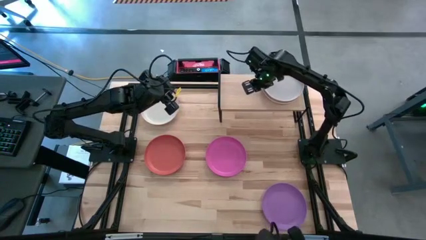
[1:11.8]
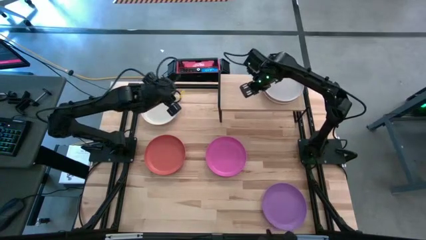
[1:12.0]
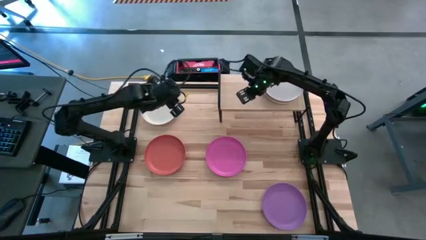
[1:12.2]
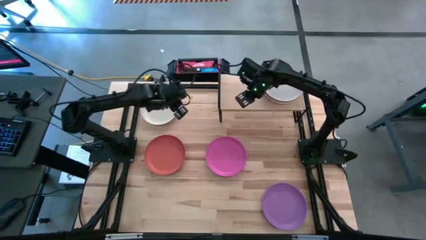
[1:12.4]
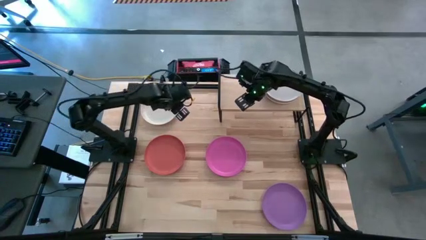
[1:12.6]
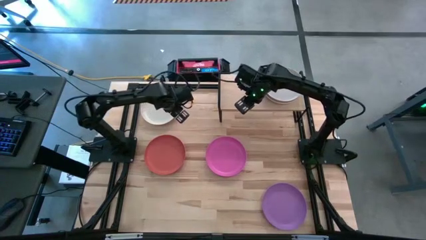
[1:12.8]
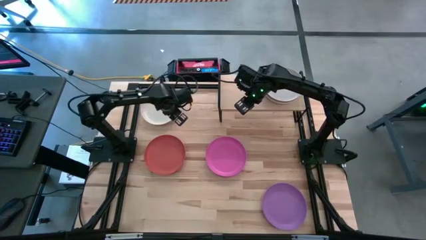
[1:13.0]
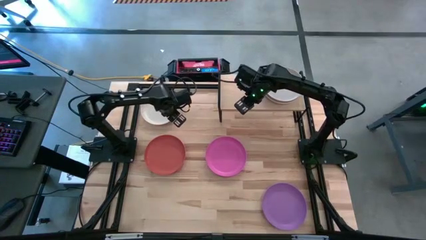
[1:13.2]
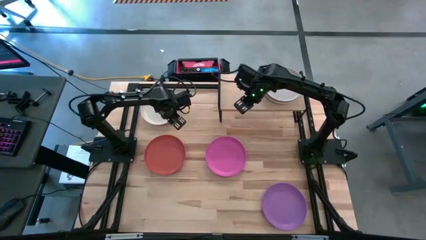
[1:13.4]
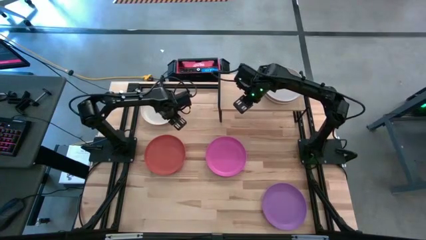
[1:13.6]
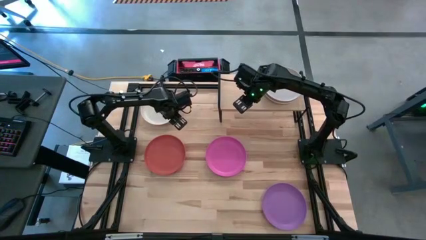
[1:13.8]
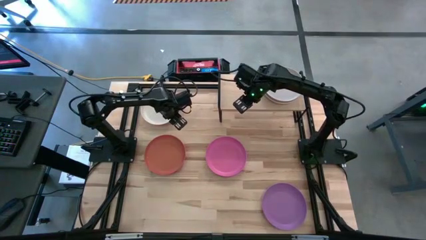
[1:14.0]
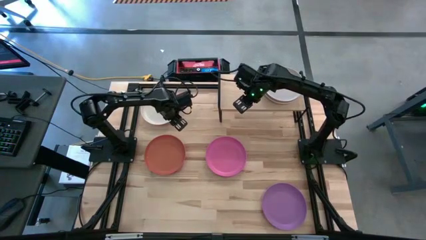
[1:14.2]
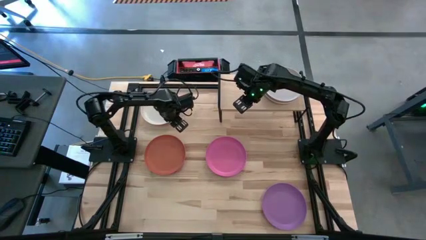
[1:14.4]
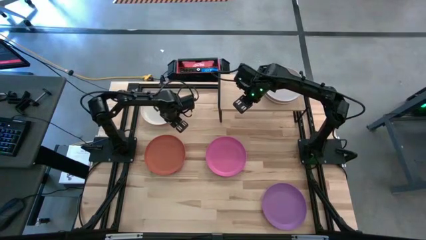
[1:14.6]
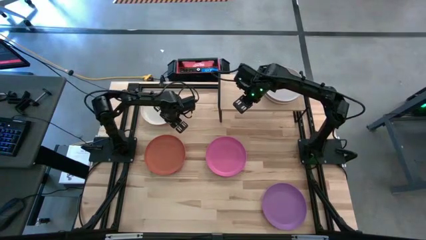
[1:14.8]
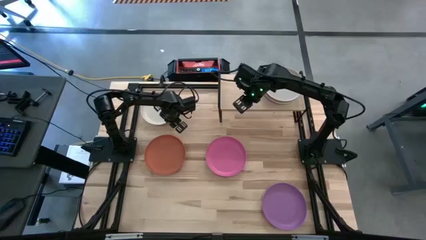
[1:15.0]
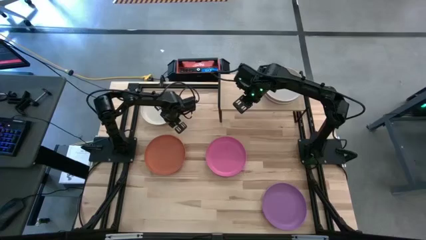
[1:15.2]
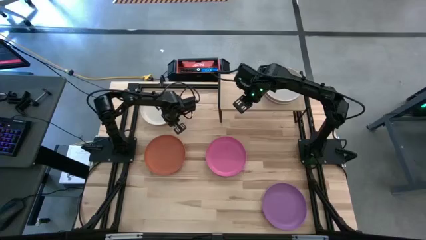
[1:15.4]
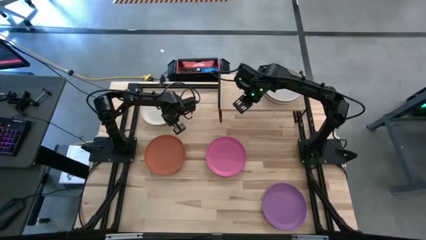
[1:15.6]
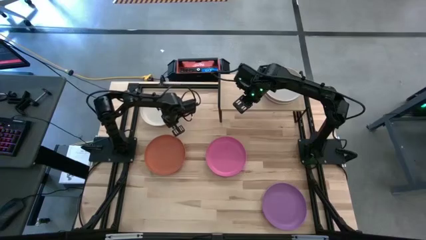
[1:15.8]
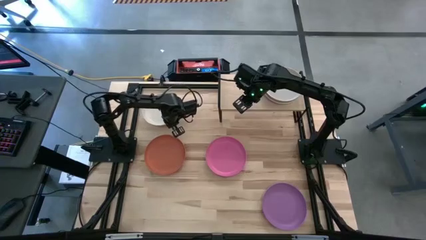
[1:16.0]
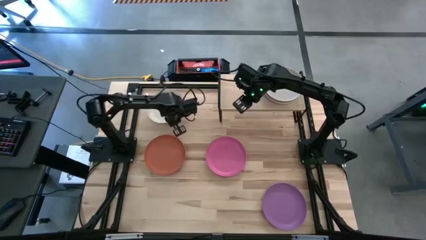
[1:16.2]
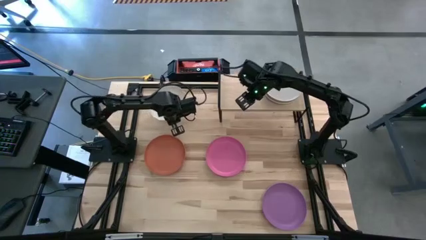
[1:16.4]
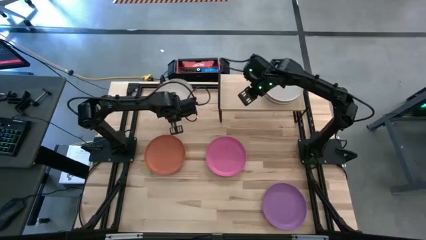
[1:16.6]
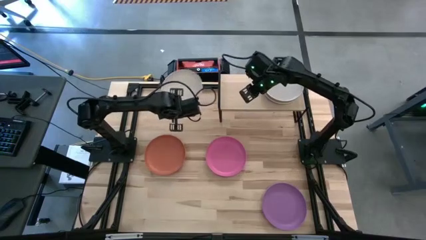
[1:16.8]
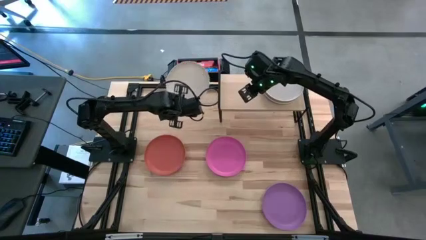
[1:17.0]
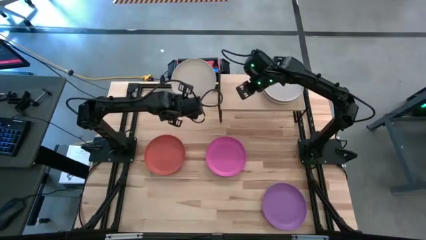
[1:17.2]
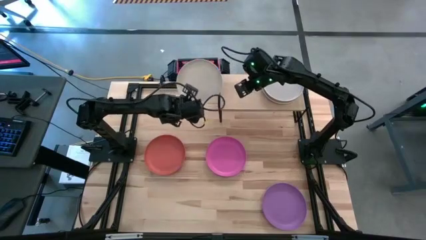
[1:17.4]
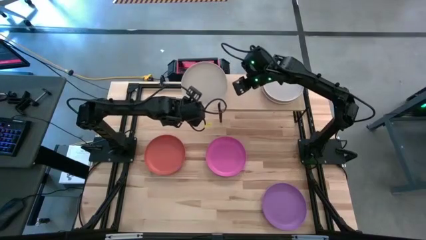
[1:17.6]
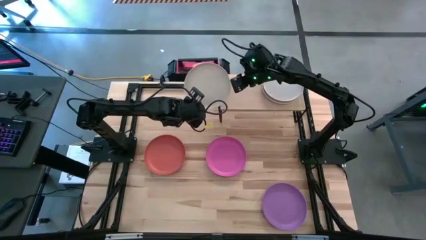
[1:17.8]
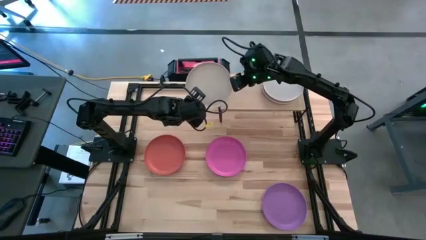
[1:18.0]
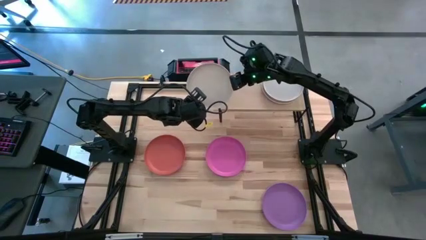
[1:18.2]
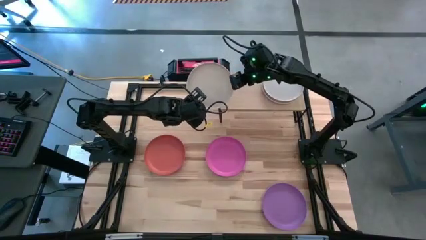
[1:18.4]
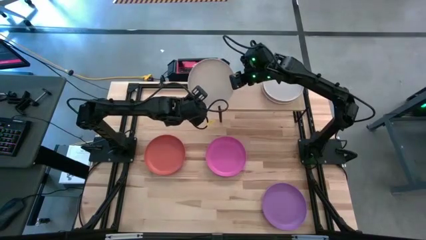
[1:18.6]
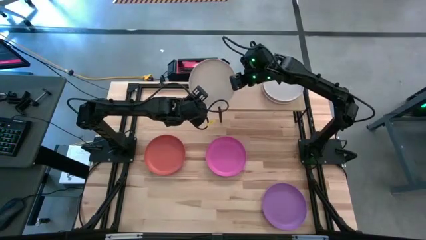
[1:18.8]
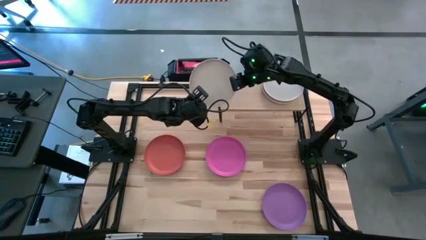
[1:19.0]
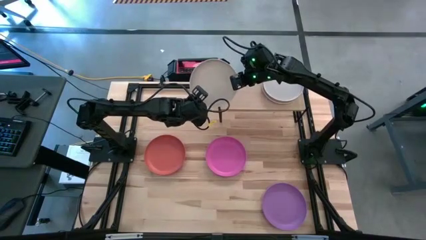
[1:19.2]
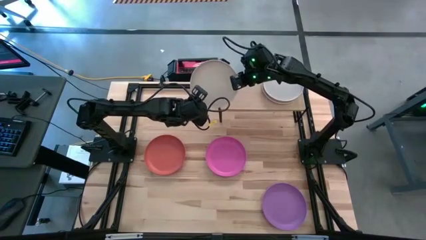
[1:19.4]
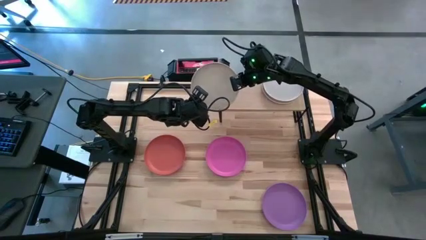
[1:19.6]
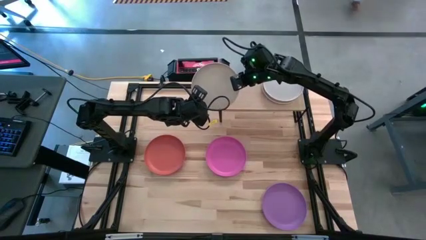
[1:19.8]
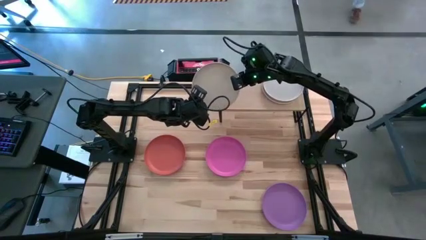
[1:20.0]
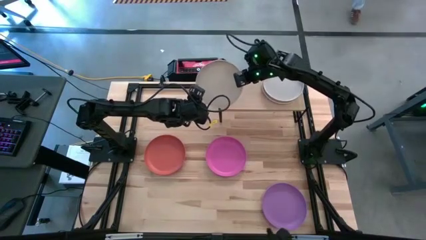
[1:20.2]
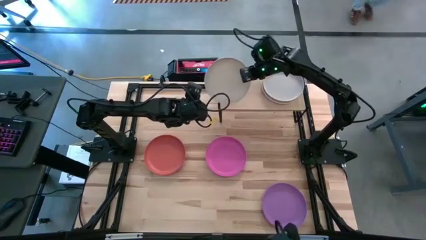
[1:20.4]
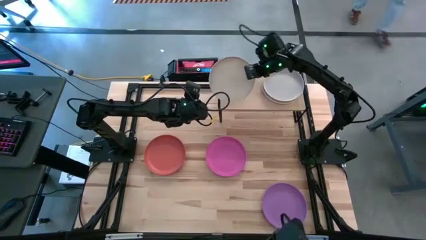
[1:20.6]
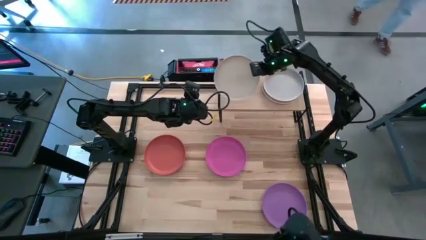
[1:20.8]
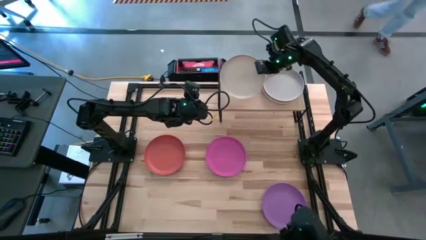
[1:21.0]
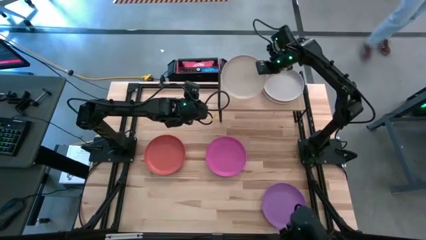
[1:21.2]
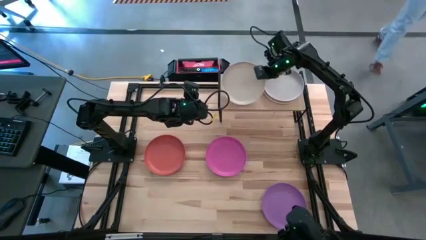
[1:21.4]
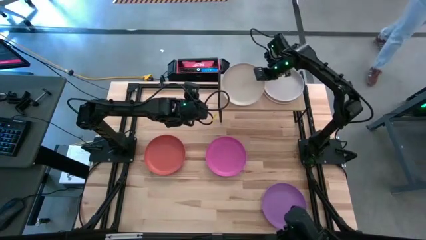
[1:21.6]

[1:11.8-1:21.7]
Task: Place and stack plates onto a shelf
Put the cream plate on the shelf

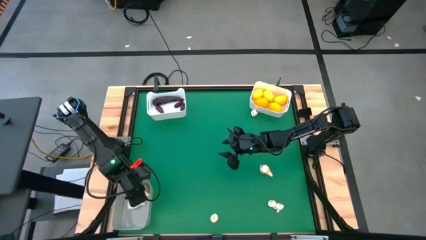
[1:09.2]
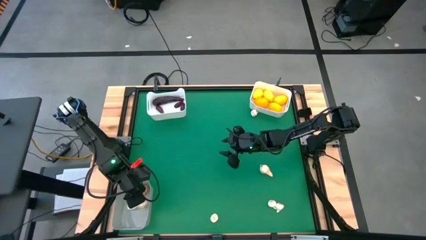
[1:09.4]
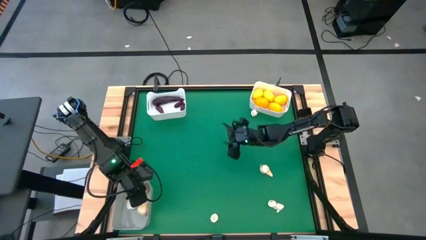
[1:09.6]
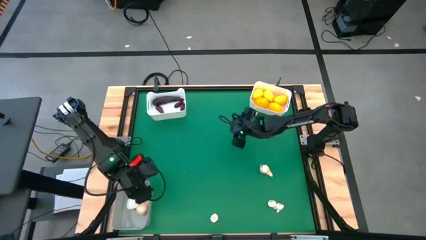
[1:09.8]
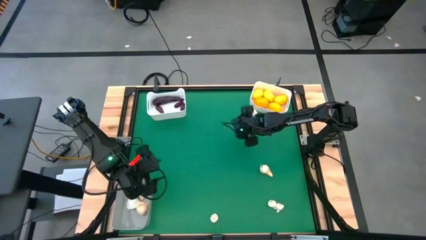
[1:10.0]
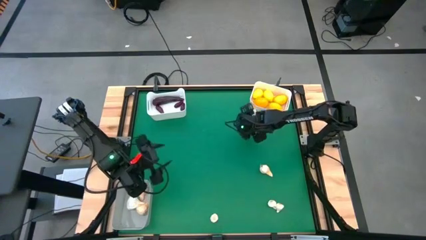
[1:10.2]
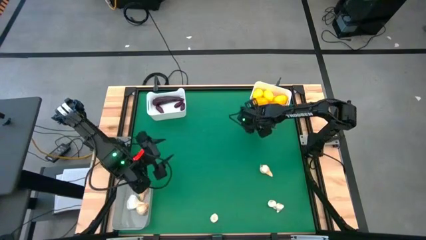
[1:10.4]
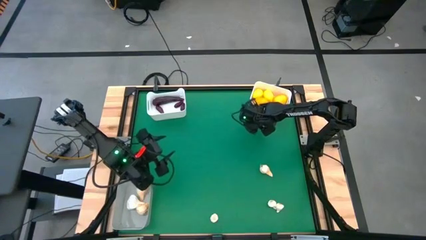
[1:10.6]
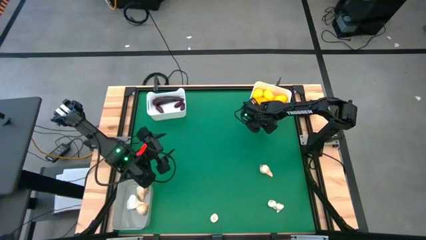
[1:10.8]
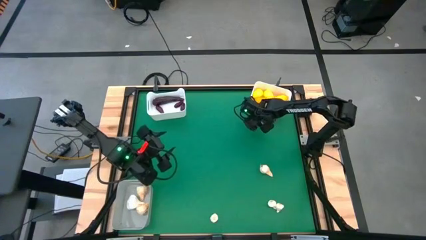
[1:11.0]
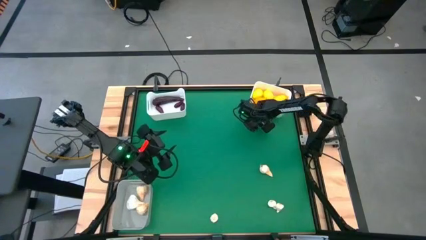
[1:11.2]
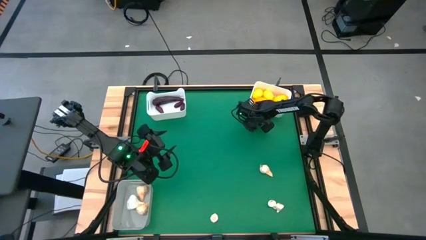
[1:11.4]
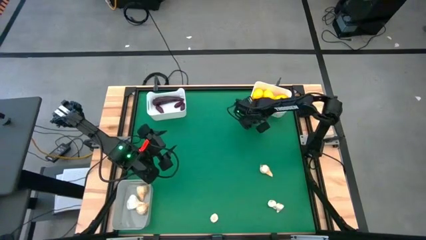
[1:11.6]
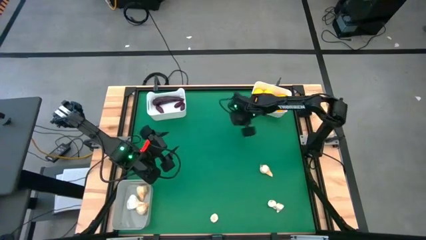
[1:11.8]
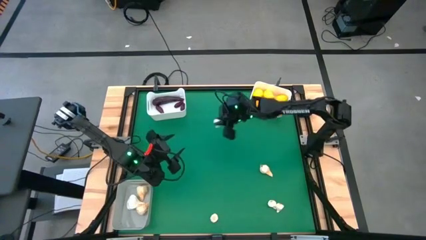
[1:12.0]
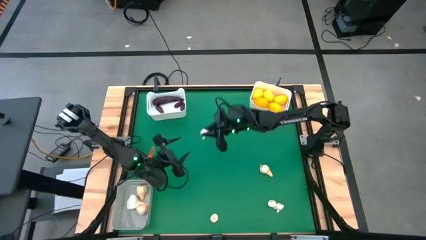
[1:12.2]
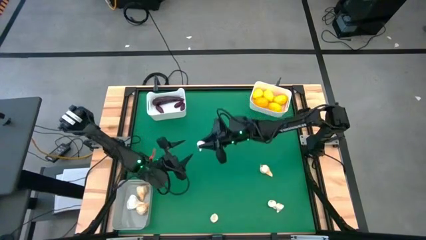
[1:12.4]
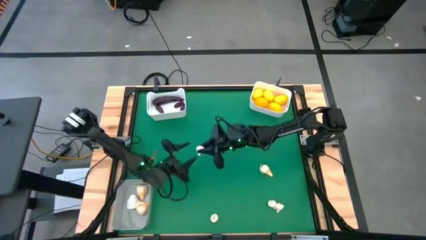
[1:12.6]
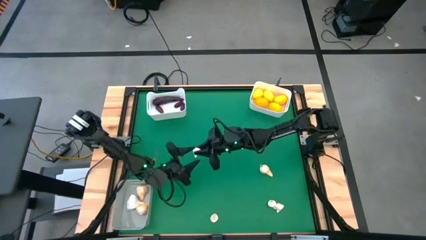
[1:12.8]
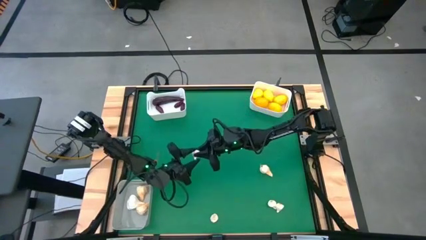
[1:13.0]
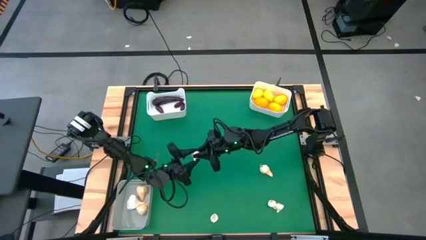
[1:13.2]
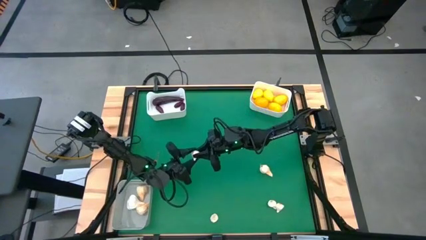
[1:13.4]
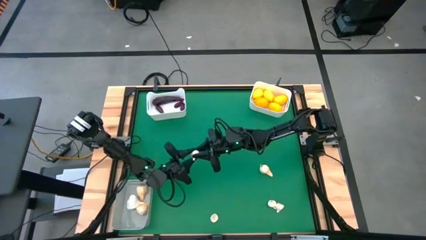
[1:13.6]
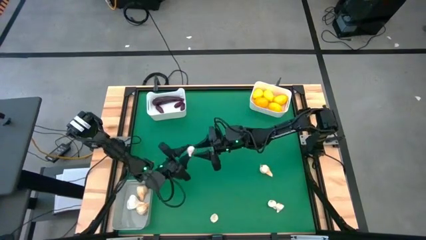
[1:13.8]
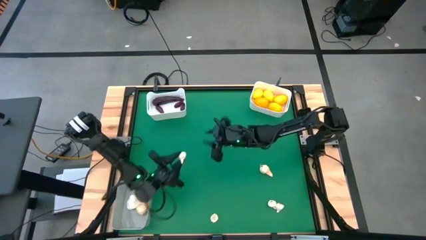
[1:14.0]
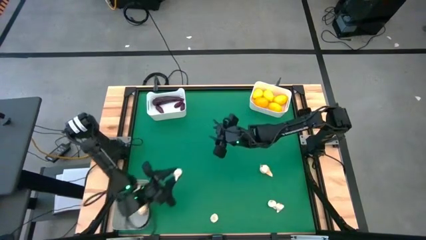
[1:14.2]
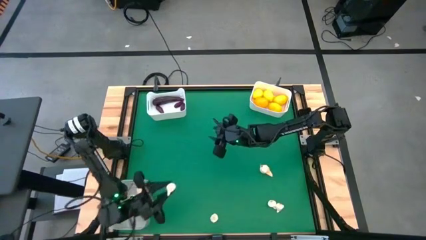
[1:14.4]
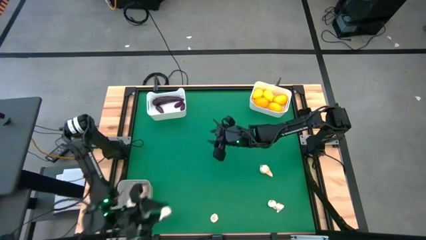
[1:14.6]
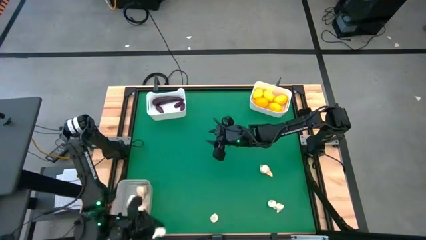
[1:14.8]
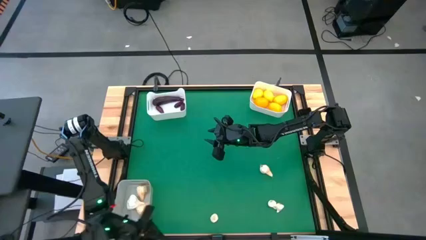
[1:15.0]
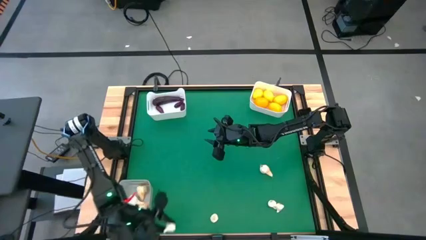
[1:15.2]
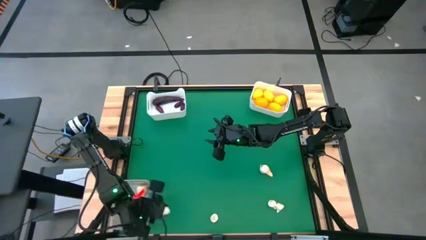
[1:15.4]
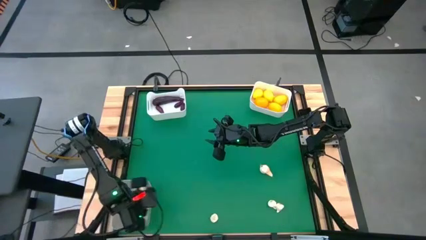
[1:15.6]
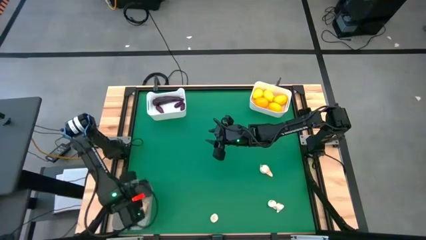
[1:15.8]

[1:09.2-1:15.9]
Task: Sort produce into baskets
Put the top right white garlic into the gray bin
